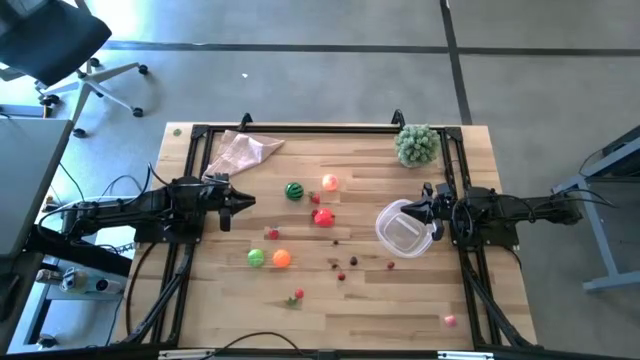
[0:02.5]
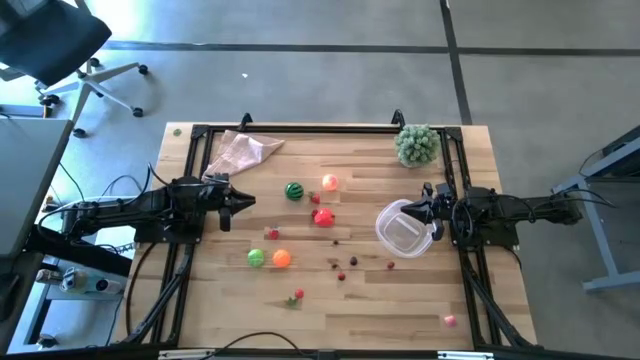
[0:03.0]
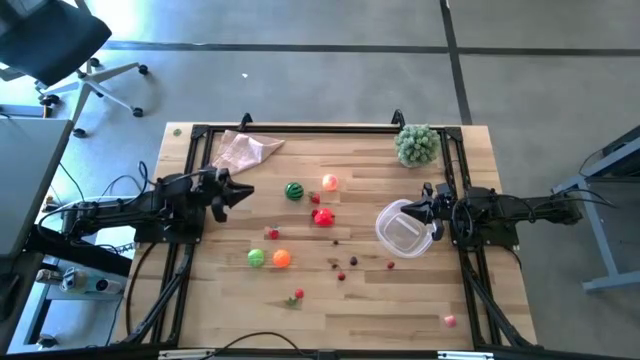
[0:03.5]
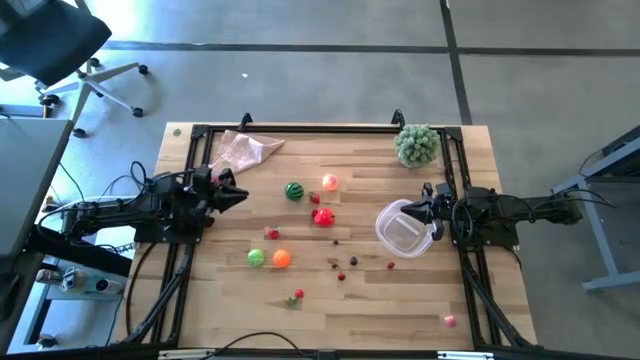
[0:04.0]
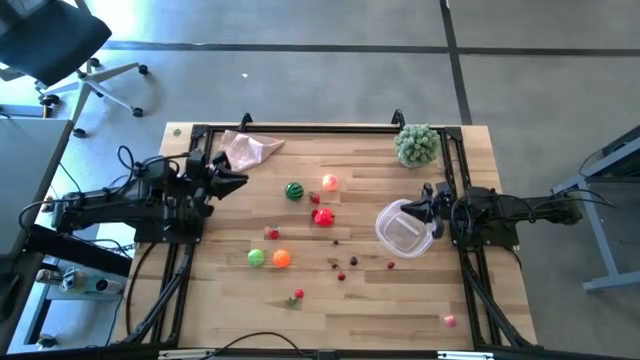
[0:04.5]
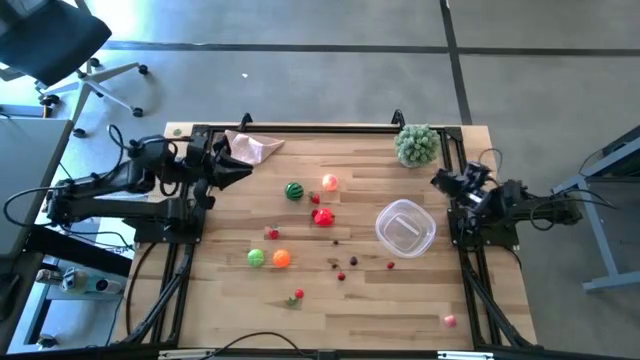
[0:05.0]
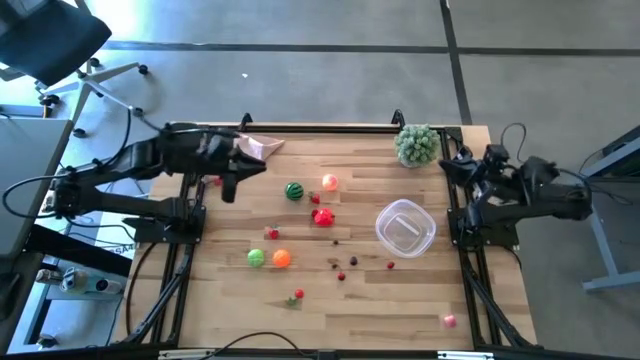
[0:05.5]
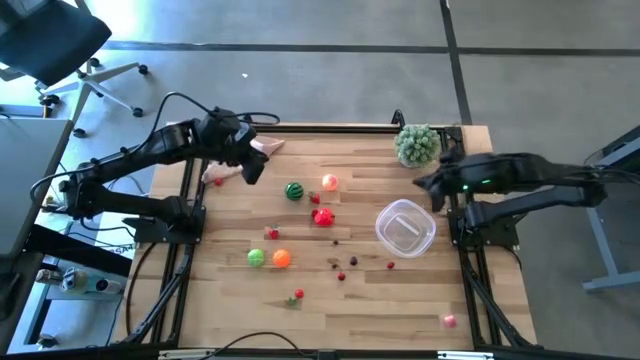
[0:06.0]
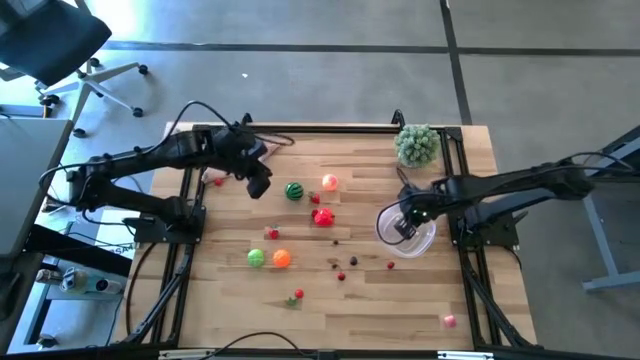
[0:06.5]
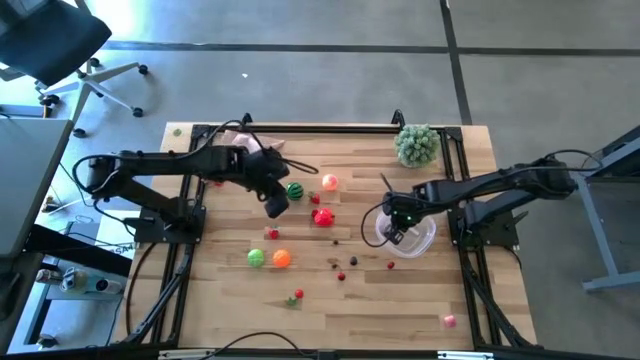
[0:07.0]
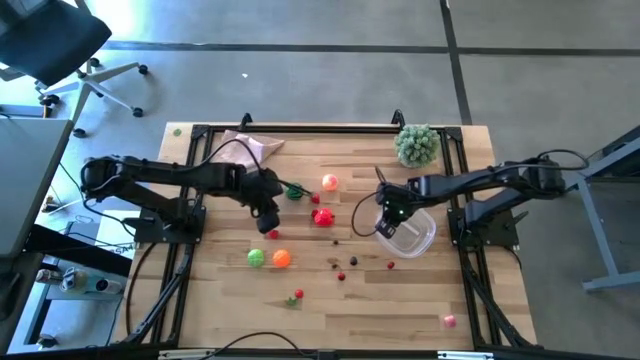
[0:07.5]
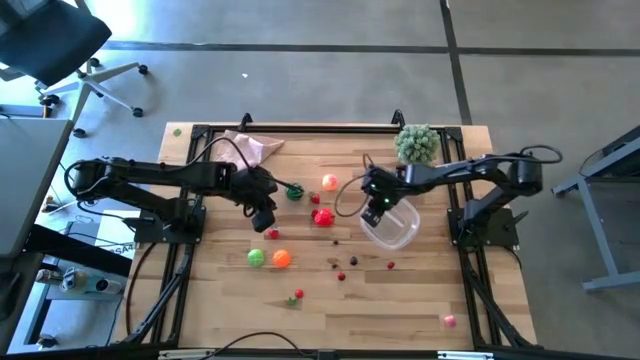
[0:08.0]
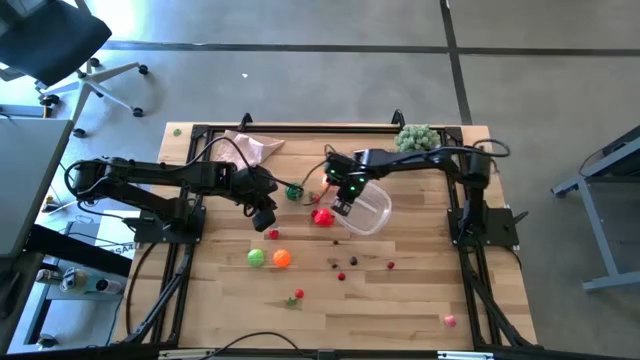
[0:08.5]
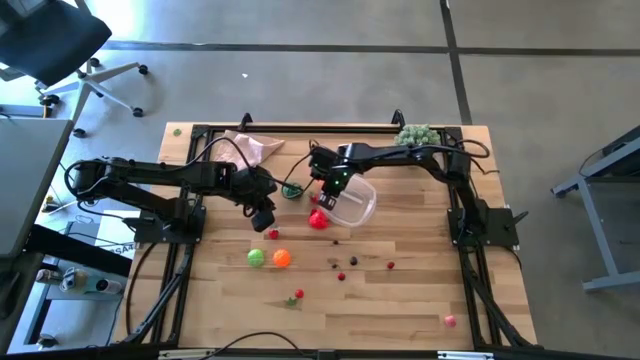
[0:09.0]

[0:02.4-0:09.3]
Task: Pick and placing Produce into tupperware
Move the transparent bin to the center of the table

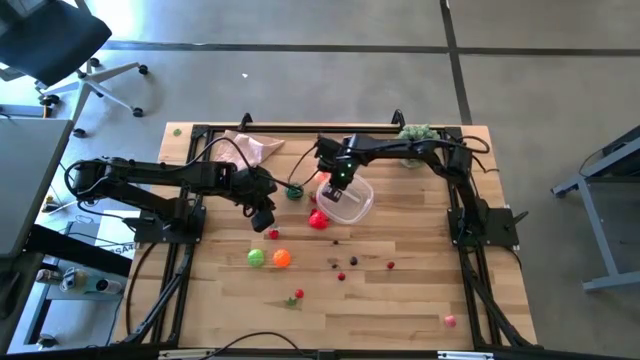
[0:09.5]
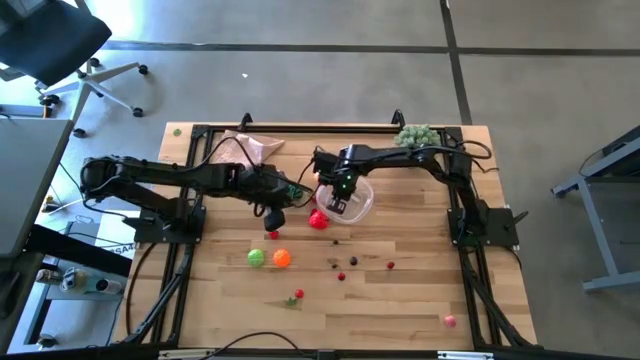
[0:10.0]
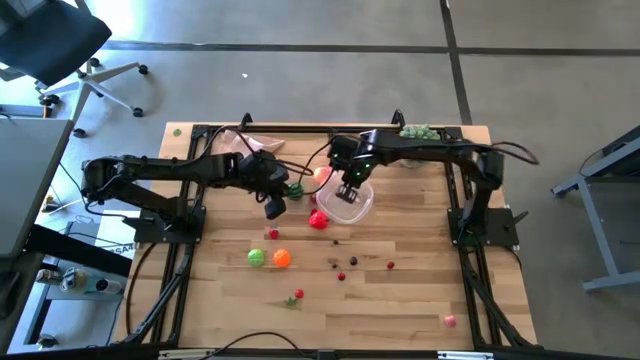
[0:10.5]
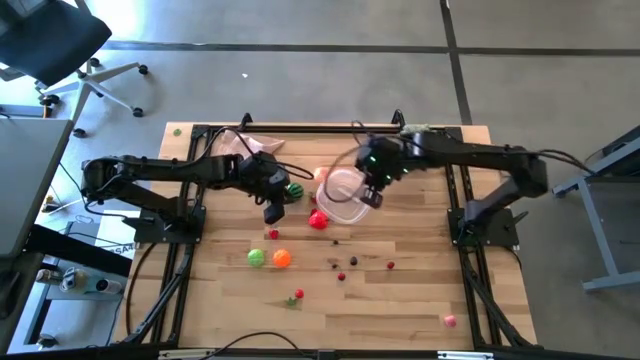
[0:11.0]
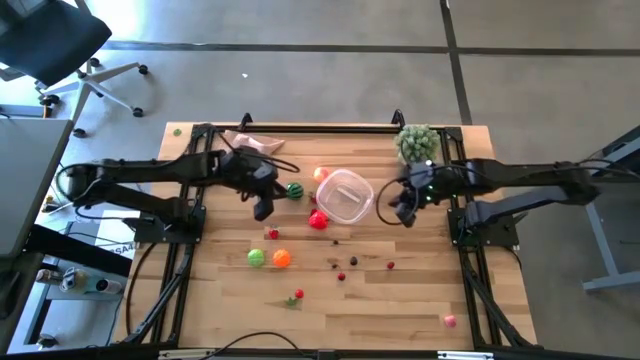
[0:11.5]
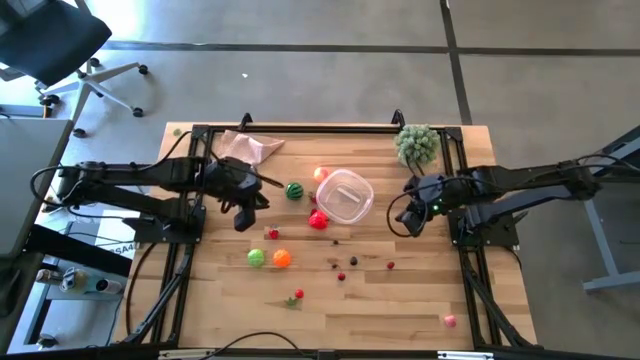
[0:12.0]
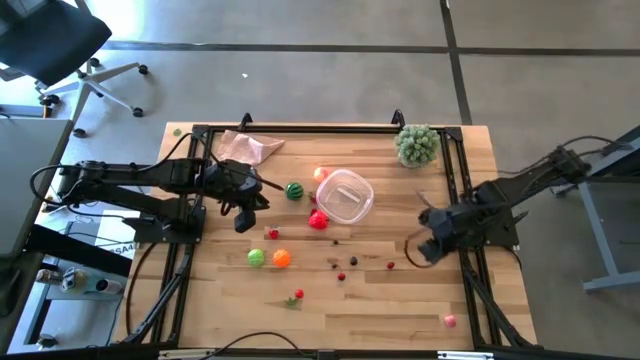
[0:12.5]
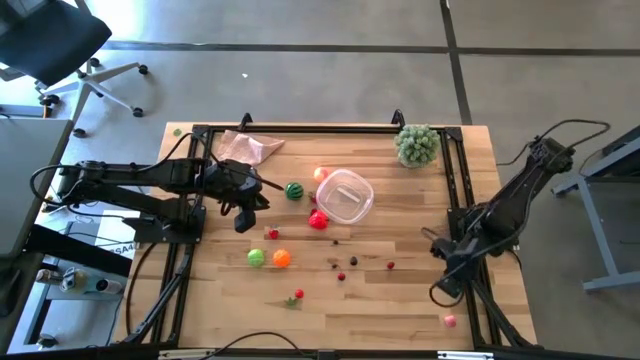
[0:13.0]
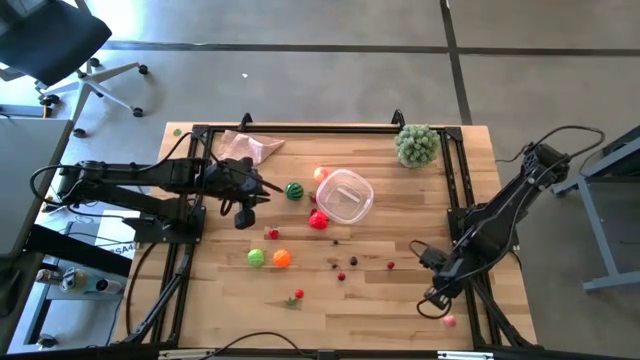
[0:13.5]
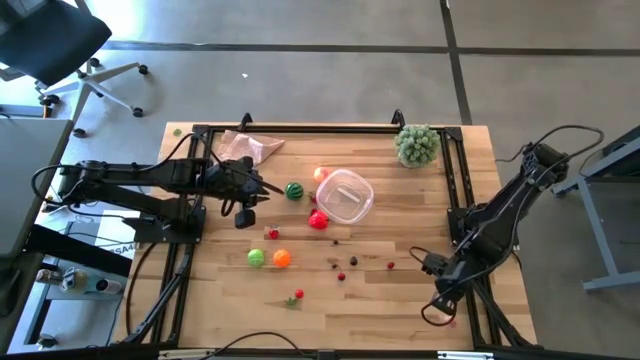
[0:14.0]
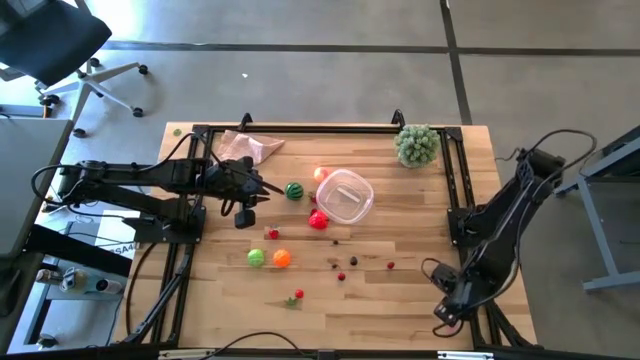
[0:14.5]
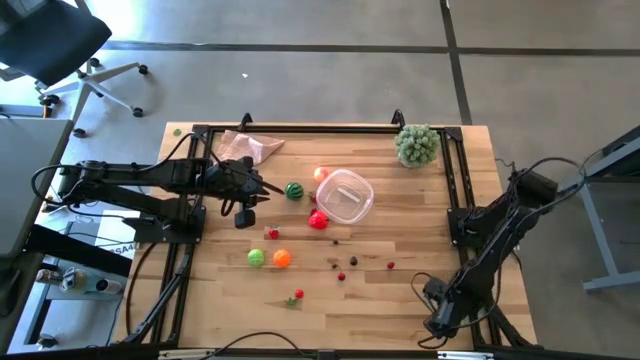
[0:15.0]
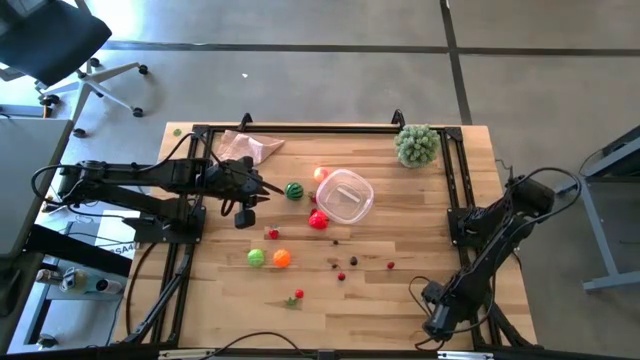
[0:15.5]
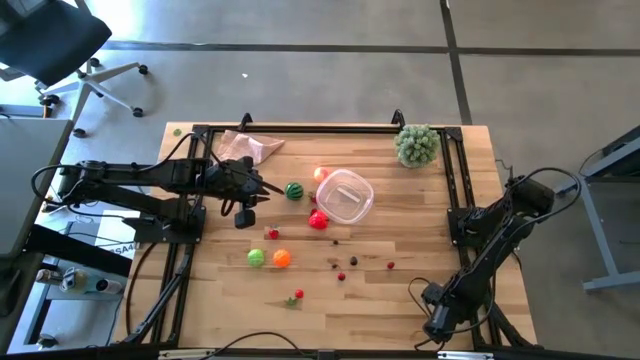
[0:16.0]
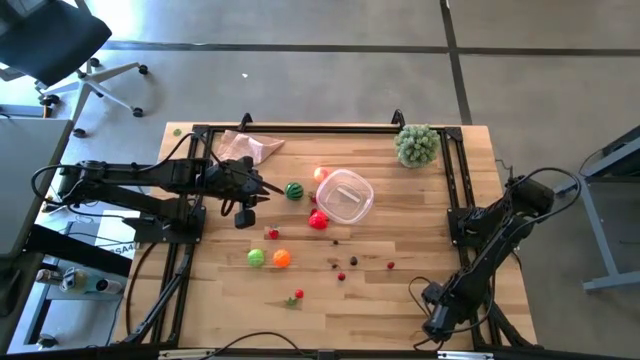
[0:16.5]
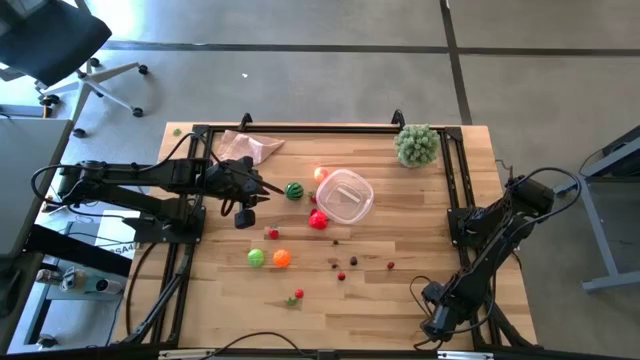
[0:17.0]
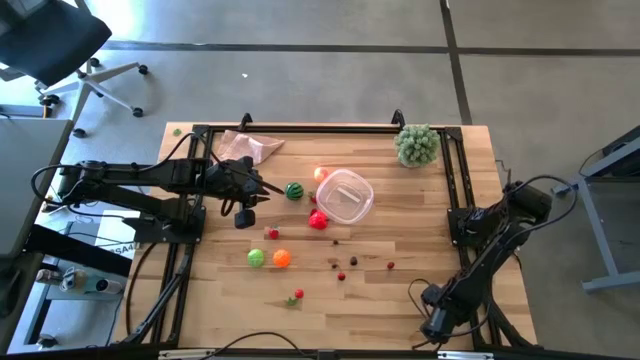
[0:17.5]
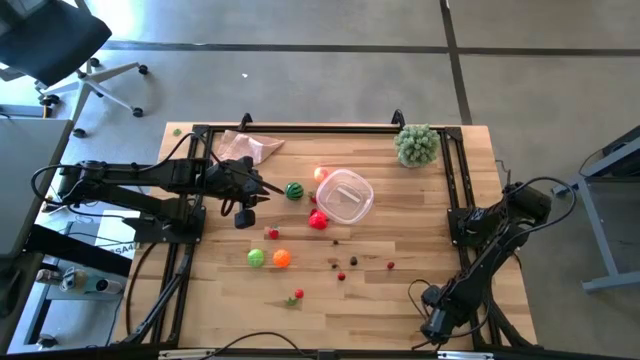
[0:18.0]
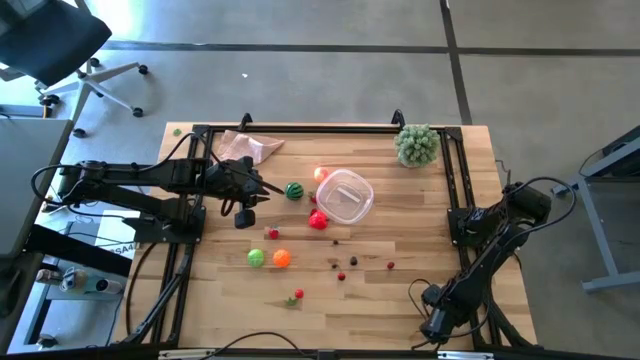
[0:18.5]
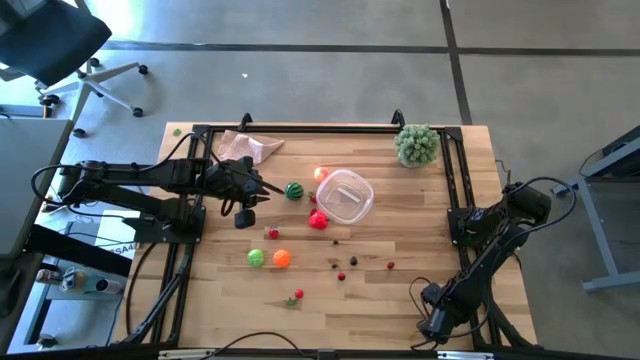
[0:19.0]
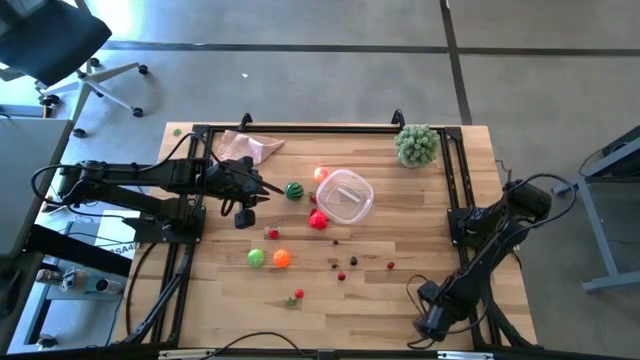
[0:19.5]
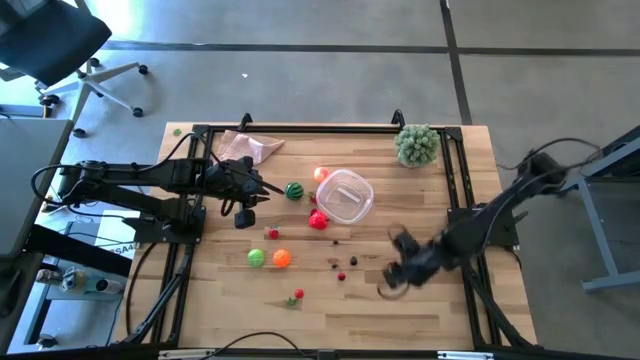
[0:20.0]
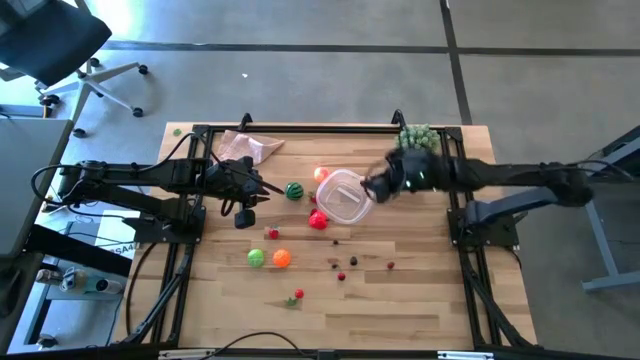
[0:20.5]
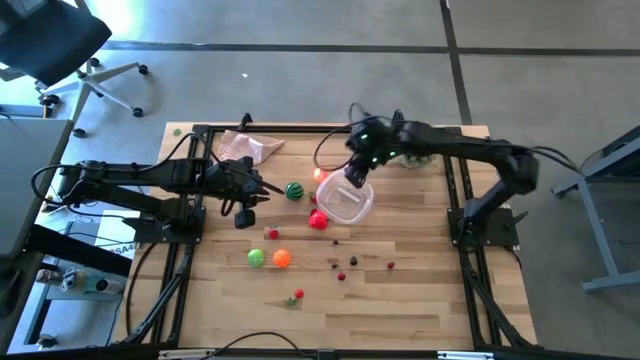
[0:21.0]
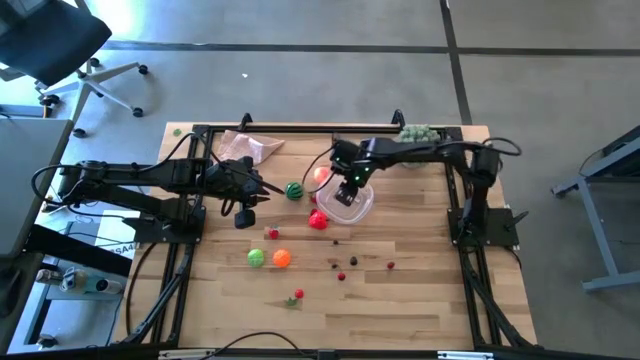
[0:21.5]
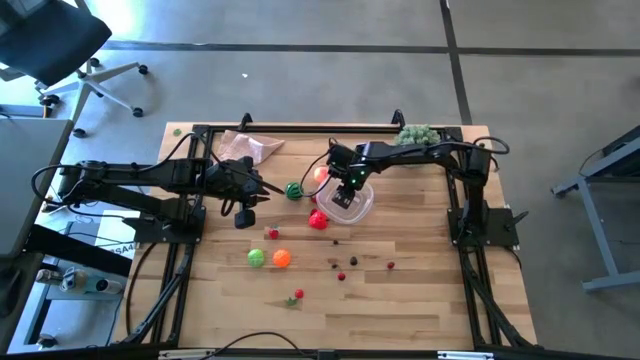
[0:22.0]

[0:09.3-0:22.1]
Put the peach into the transparent bin

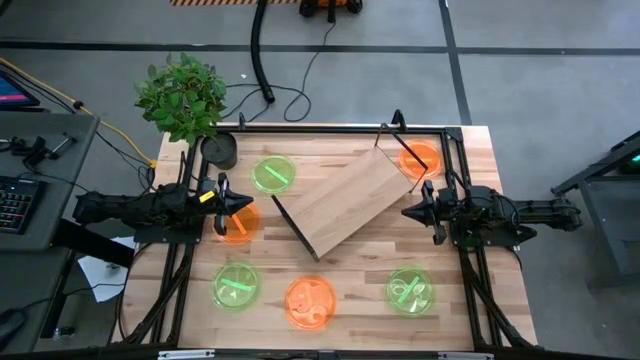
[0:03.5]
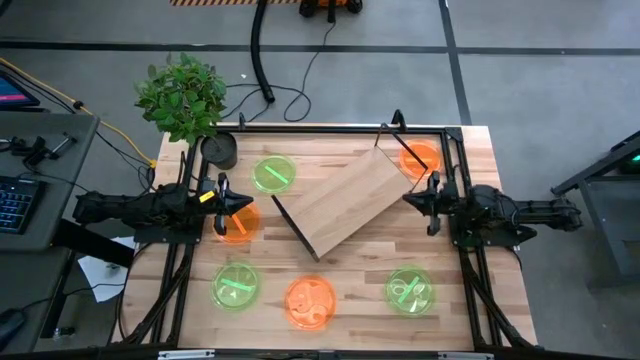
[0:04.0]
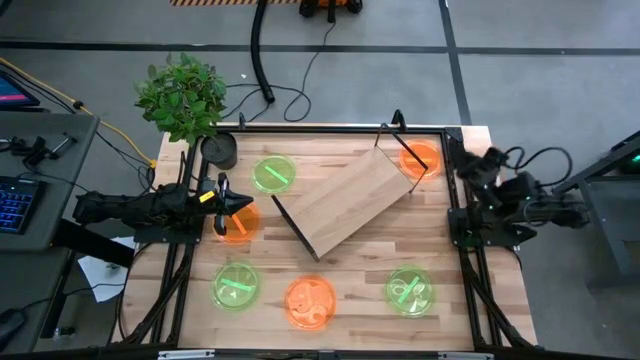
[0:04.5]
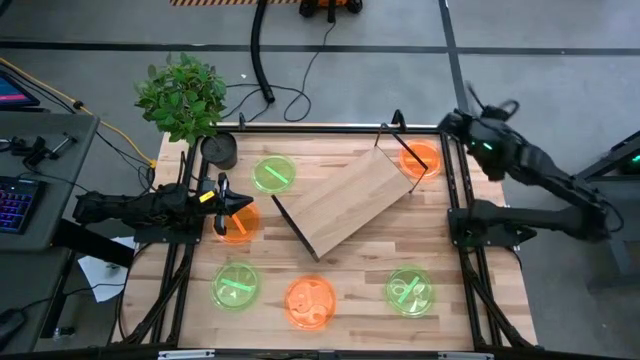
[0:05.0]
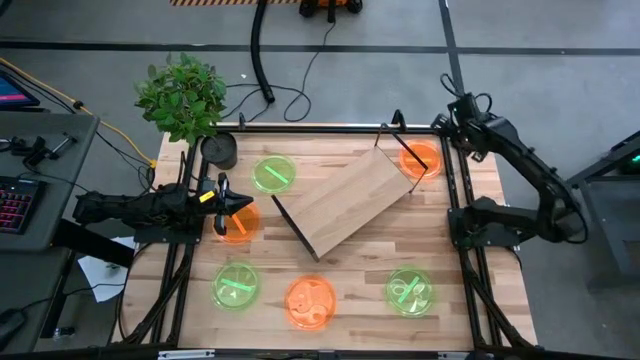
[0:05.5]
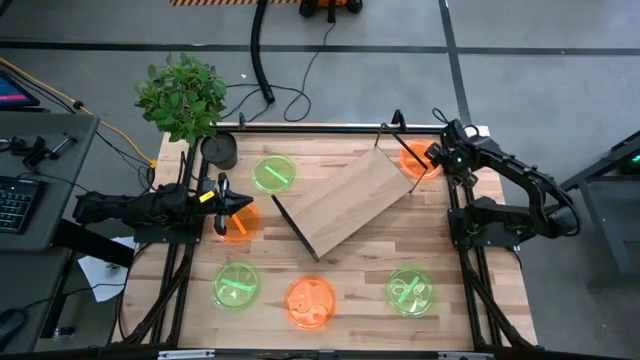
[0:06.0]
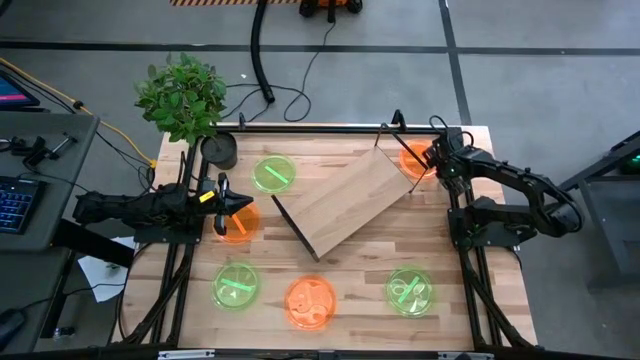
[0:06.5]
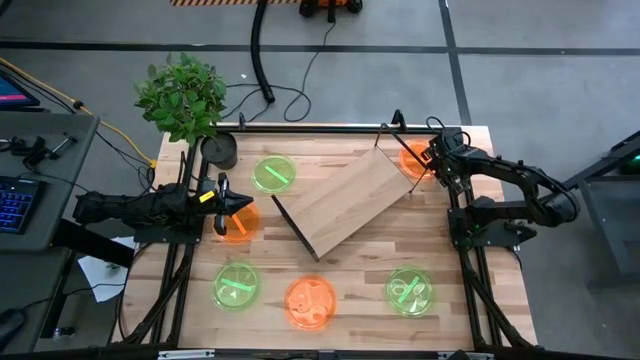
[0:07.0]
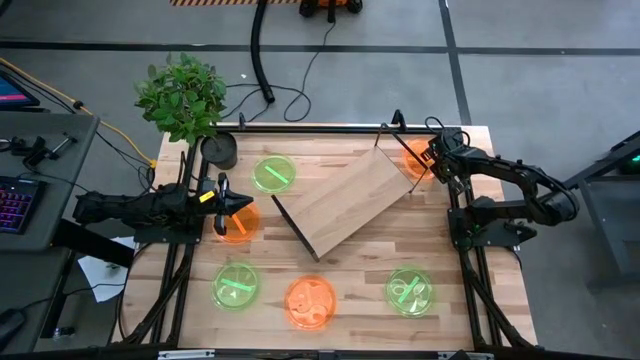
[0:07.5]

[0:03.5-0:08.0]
Task: Place and stack plates onto a shelf
Put the top right orange plate on the shelf
